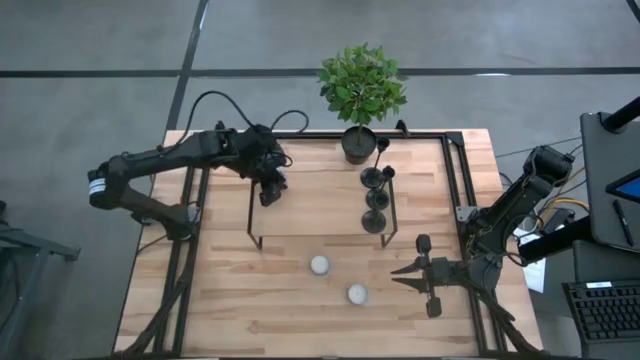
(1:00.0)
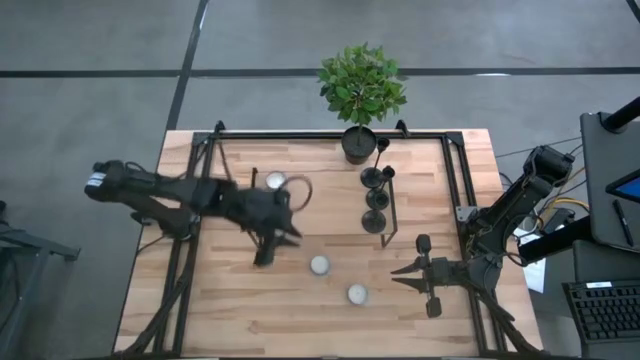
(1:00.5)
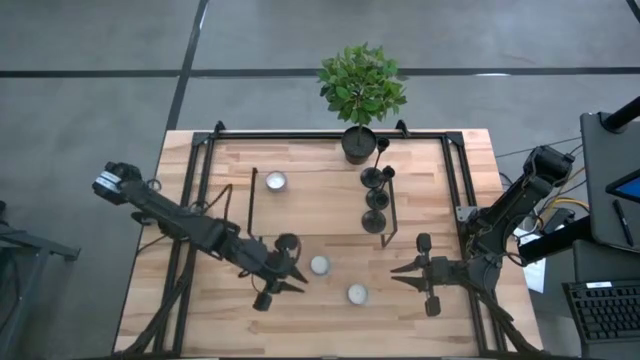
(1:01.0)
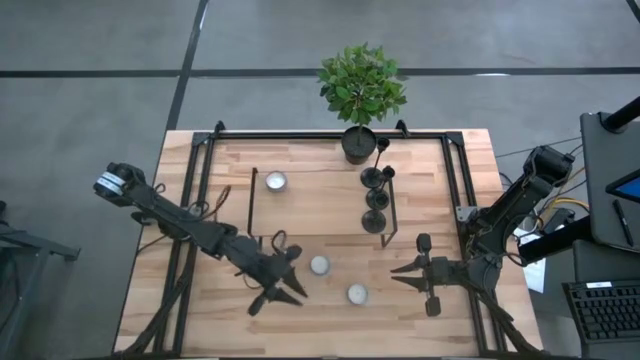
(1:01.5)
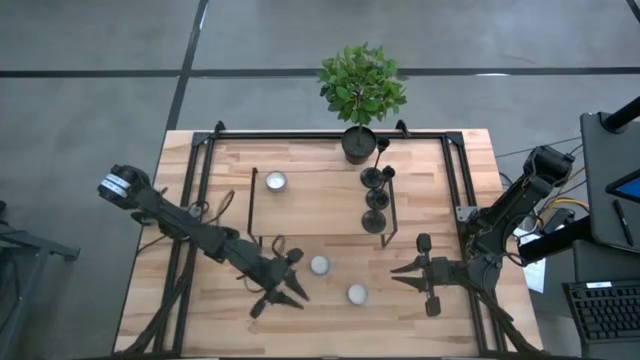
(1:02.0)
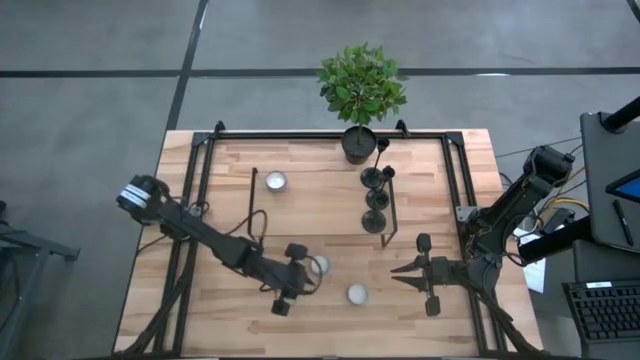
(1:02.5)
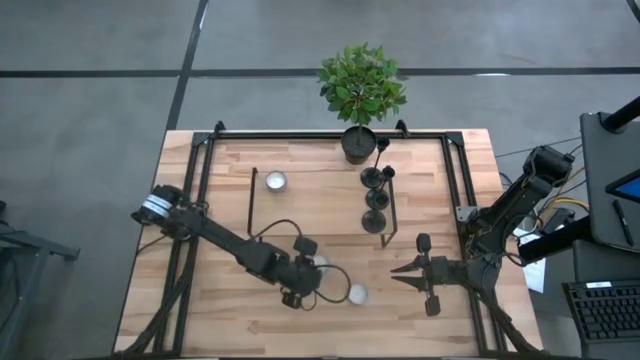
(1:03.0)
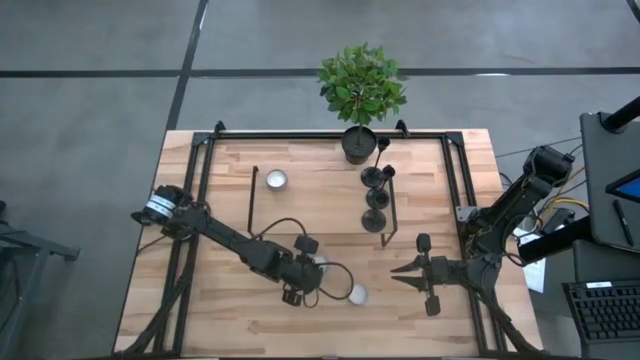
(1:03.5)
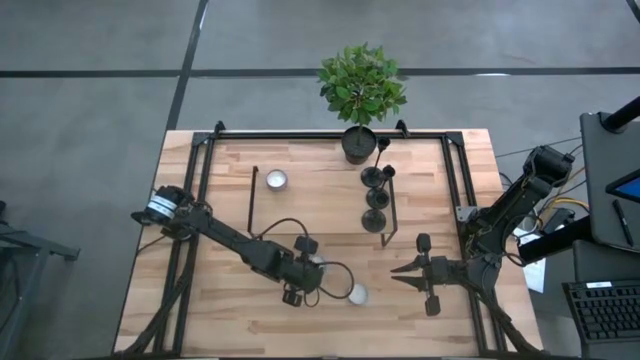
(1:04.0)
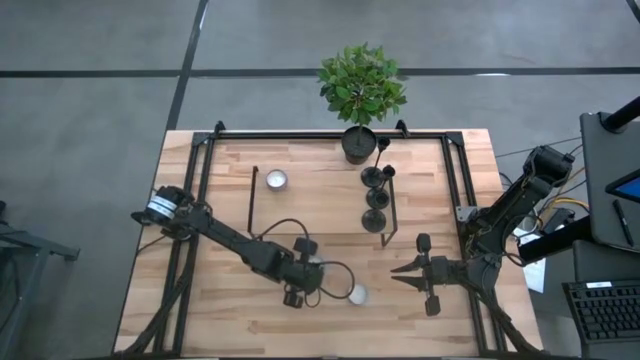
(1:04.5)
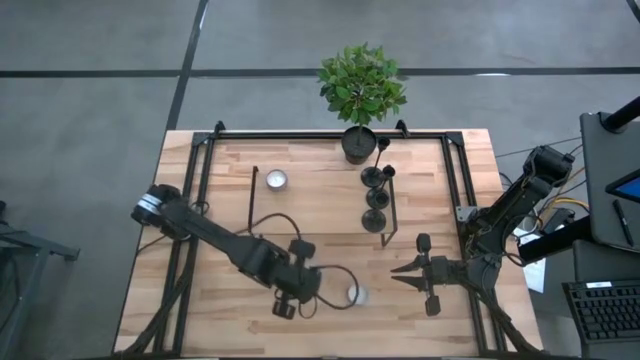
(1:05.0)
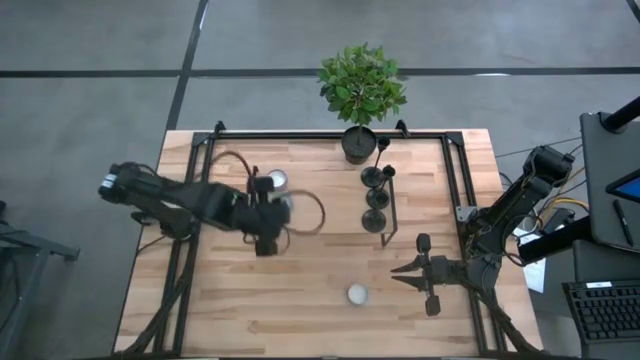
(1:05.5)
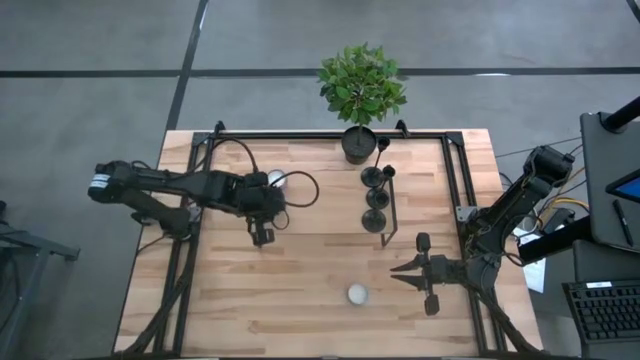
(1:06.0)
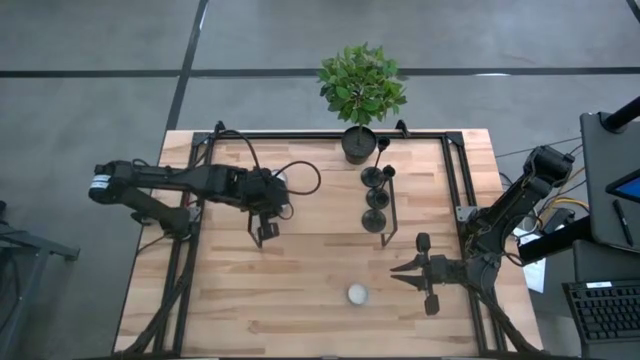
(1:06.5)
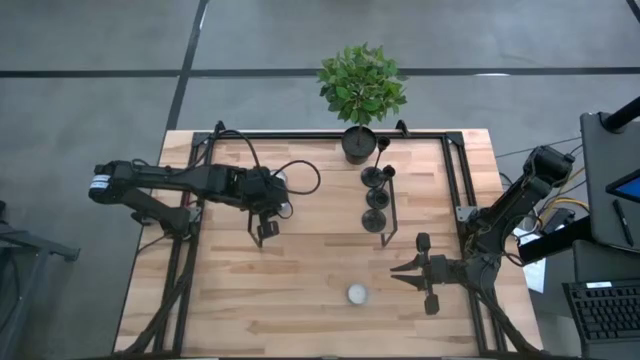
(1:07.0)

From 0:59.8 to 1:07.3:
Task: Pick & Place candle stick holders
Put the blue scented candle on the shelf aligned with the other scented candle

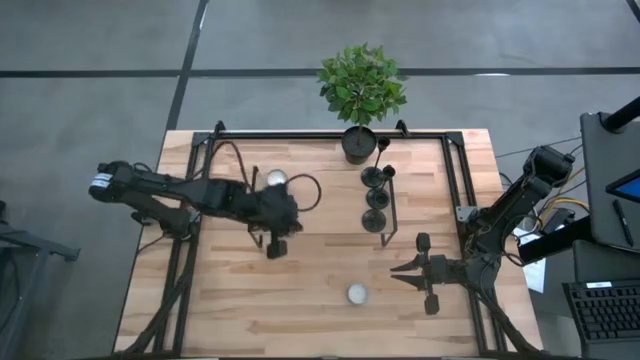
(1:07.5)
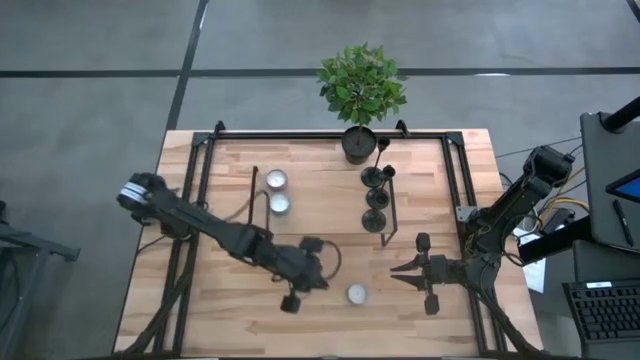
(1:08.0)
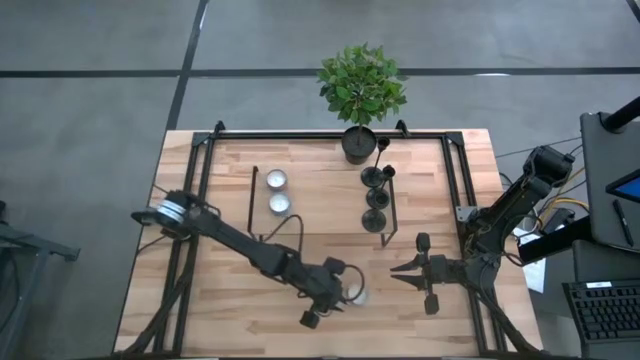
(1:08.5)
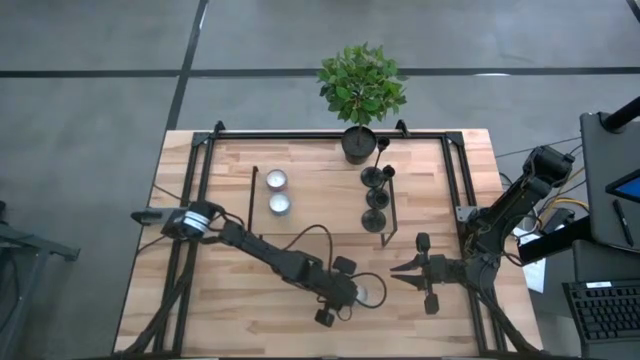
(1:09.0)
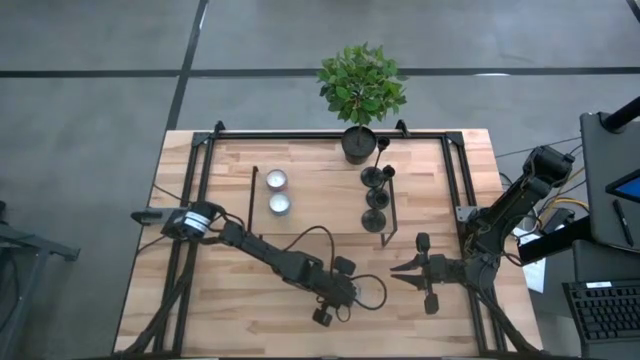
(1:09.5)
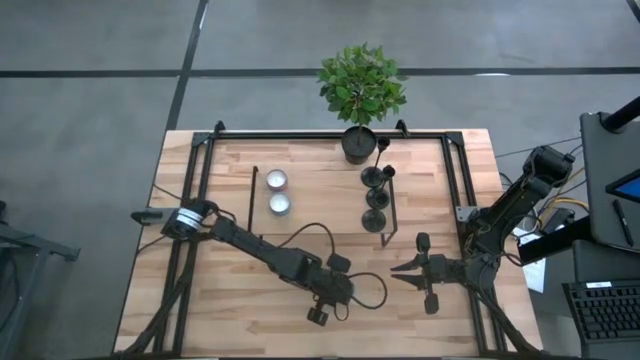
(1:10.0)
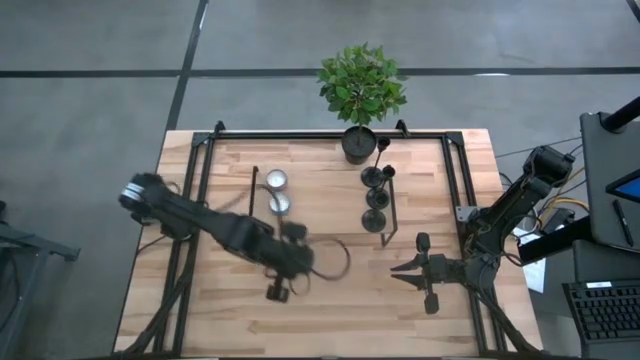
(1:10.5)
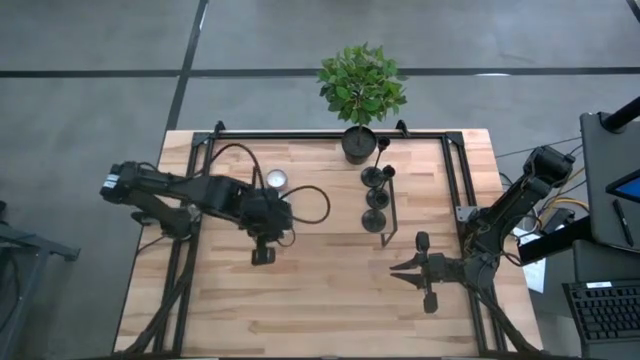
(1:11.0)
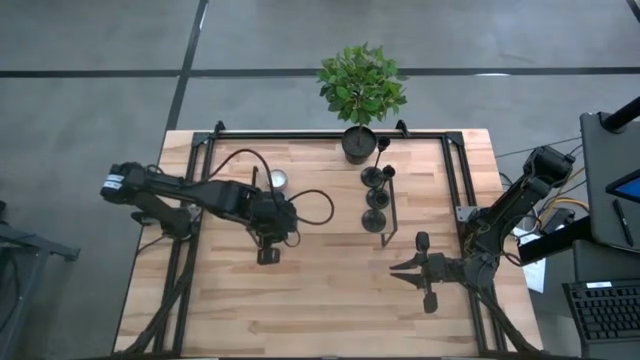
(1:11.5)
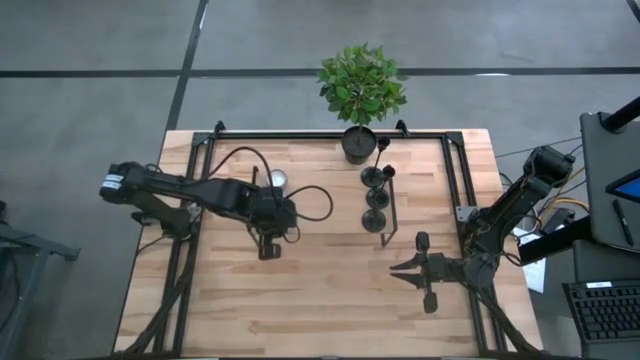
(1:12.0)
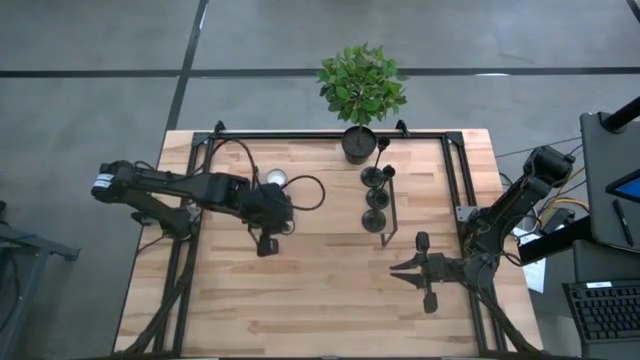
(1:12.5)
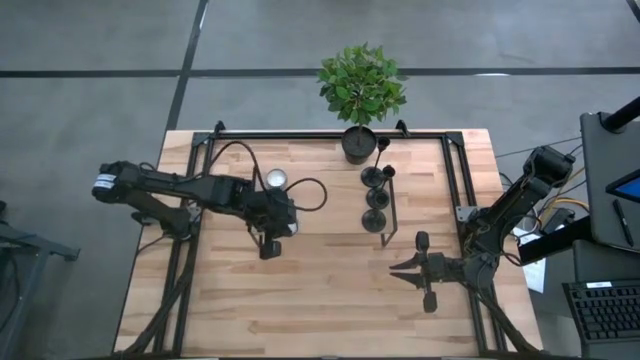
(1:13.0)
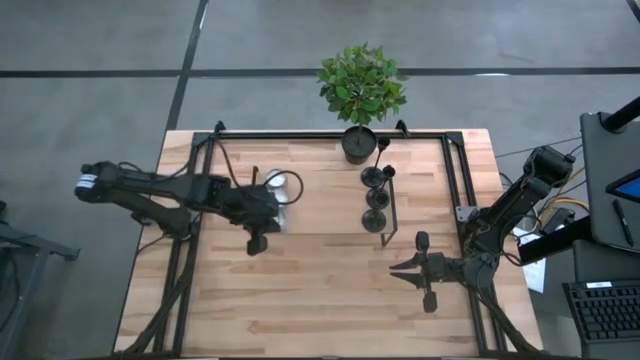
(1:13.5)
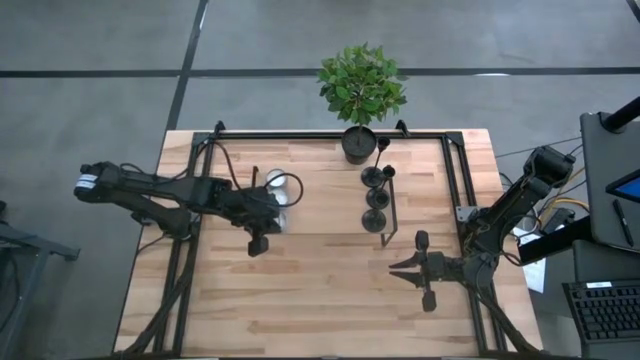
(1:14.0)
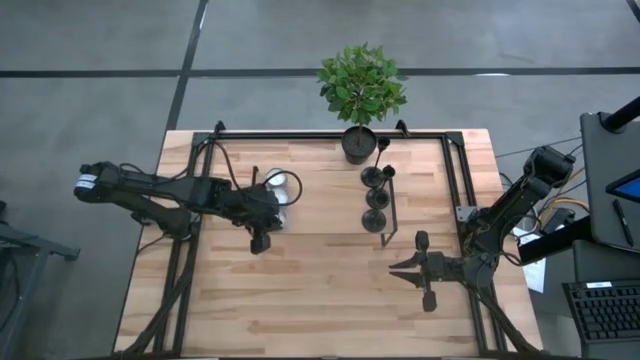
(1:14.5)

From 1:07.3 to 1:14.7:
Put the white scented candle on the shelf aligned with the other scented candles

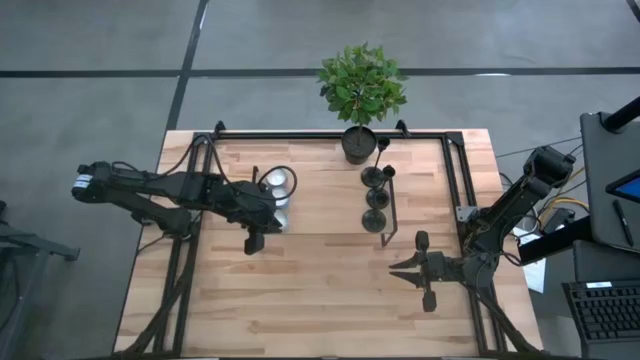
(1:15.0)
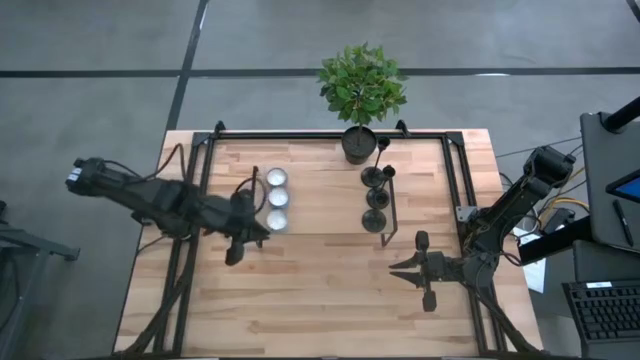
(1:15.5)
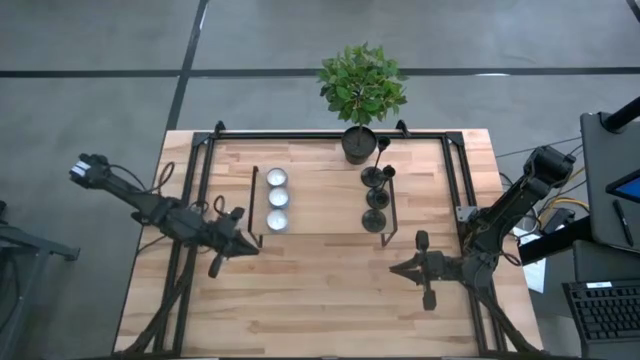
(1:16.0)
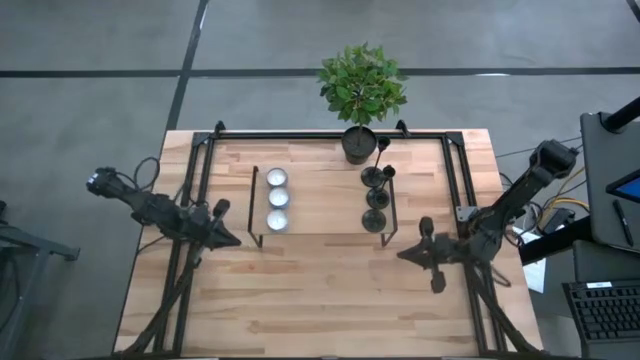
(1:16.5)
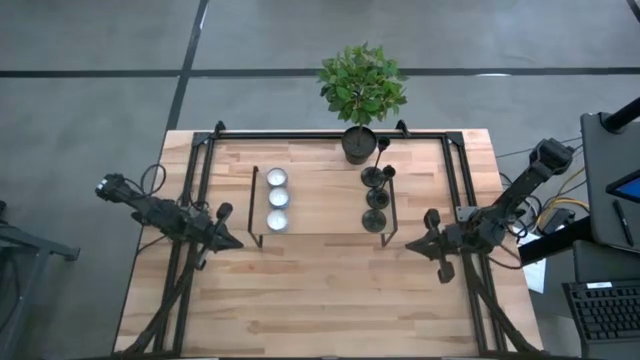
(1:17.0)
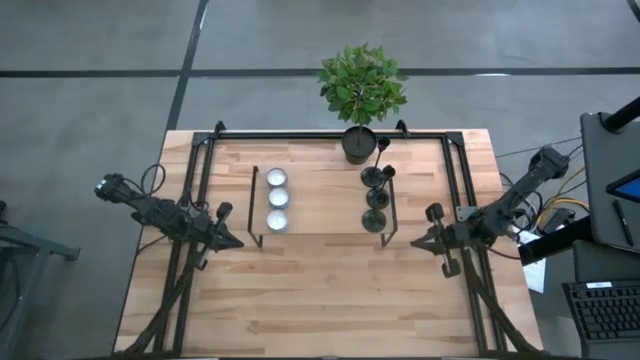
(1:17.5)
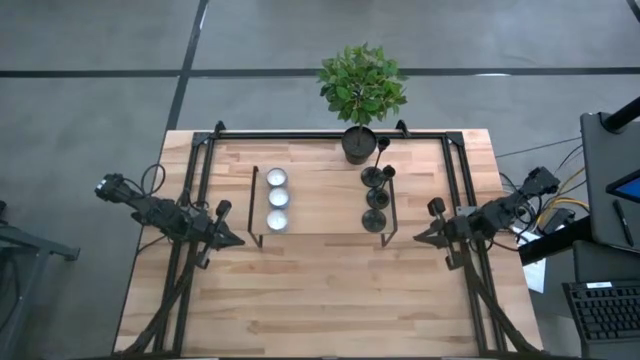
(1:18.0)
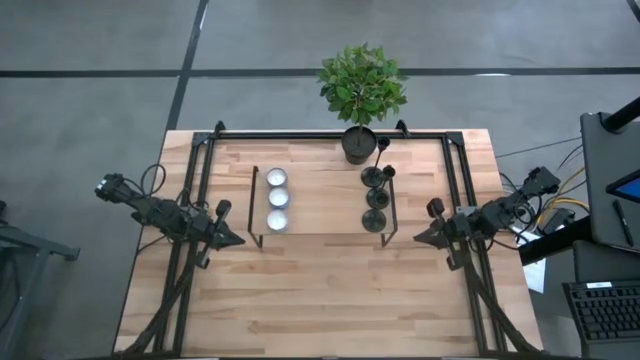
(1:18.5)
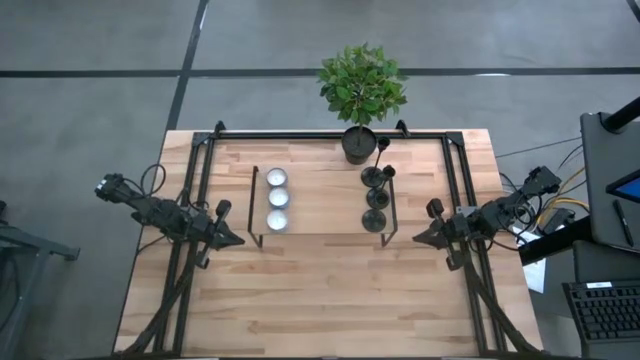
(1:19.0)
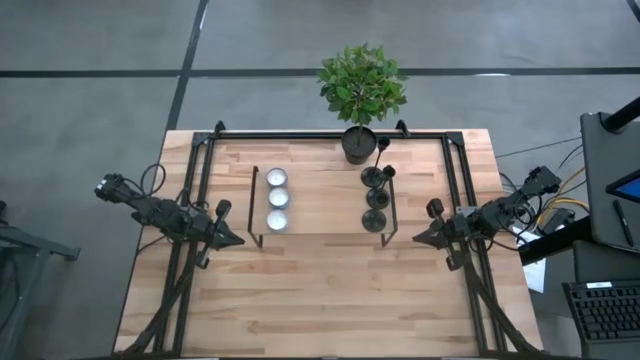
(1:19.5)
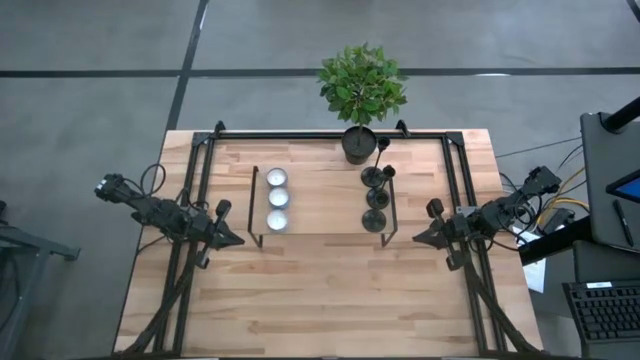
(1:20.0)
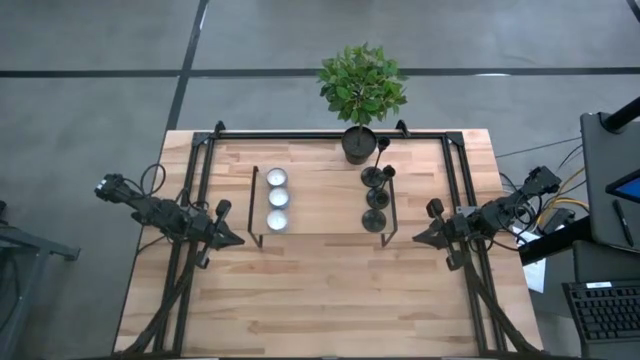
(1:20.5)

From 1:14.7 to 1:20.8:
Return to Home Position

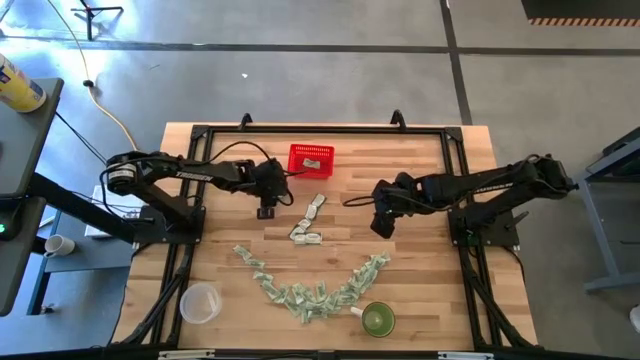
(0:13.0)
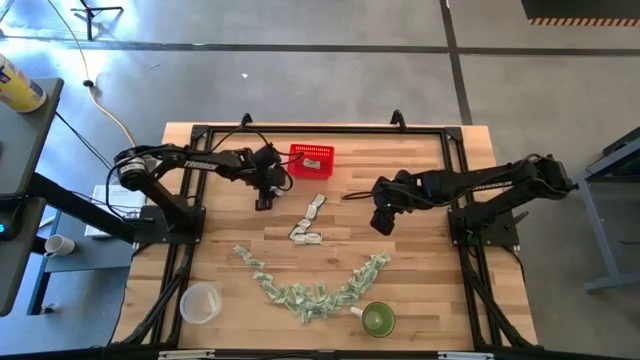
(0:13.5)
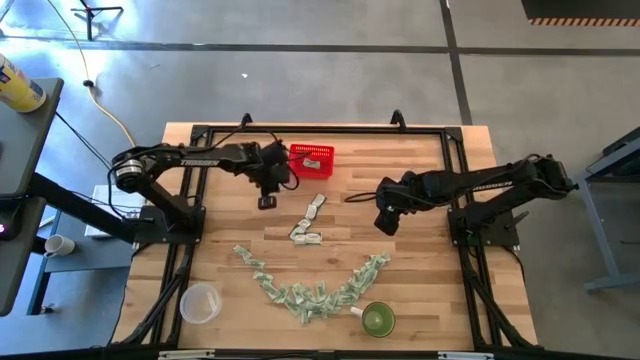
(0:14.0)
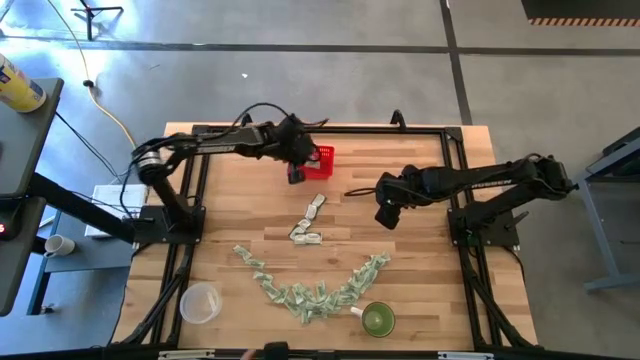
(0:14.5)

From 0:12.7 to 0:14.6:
Task: Pick and place items into bin
Put the light green stevia packet into the red bin
